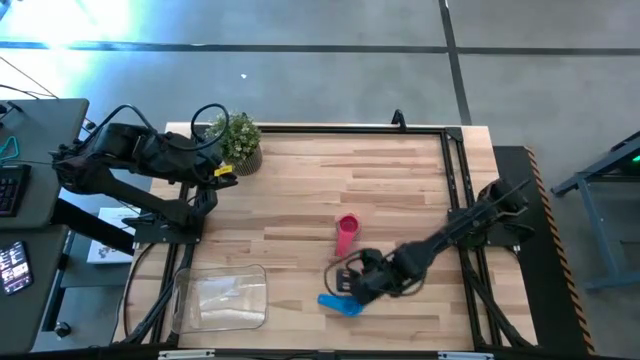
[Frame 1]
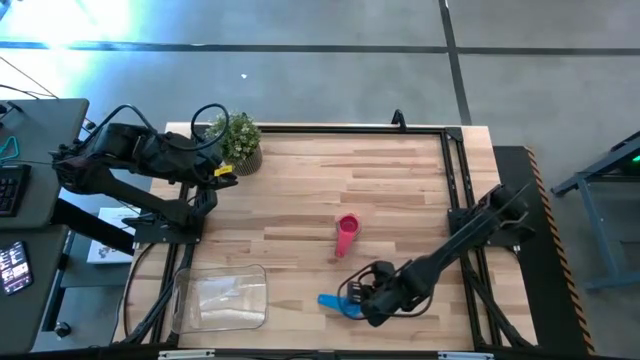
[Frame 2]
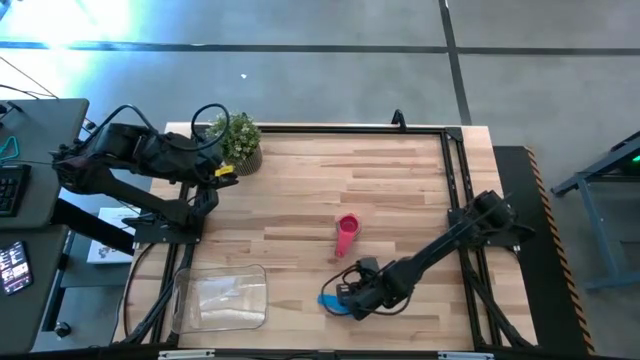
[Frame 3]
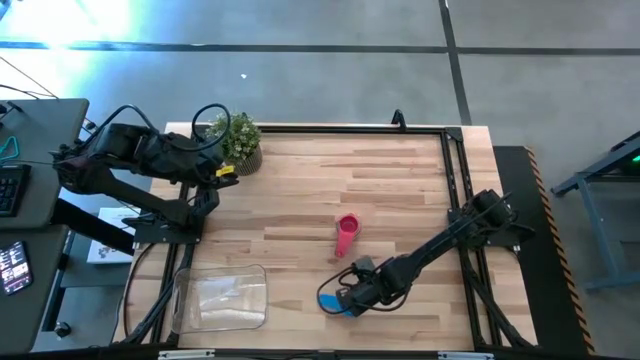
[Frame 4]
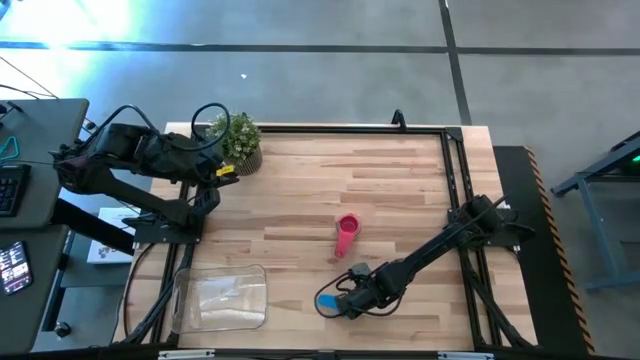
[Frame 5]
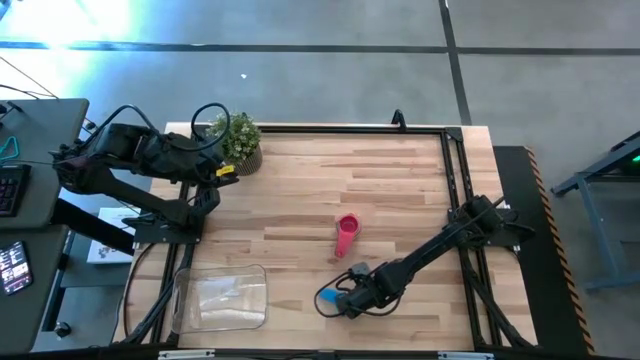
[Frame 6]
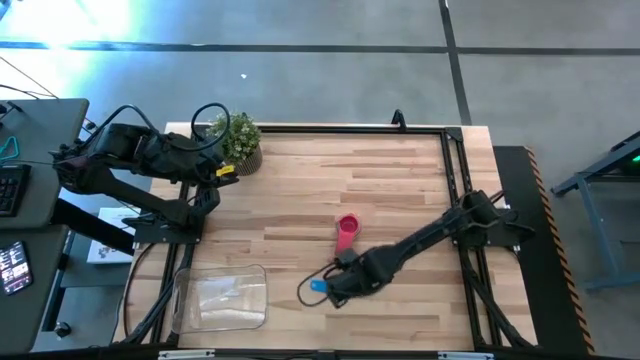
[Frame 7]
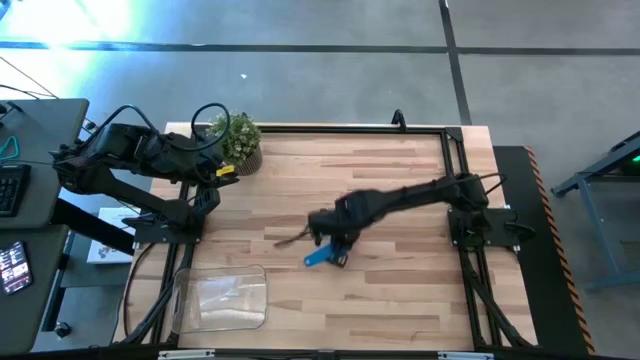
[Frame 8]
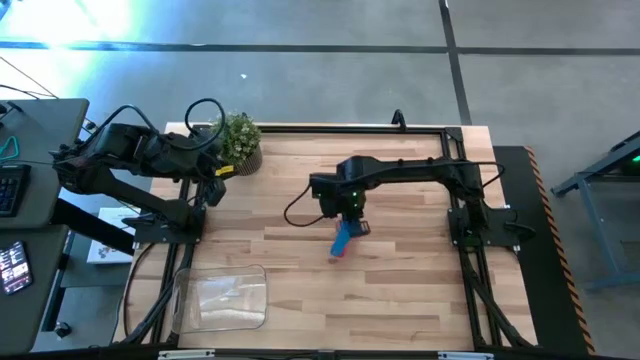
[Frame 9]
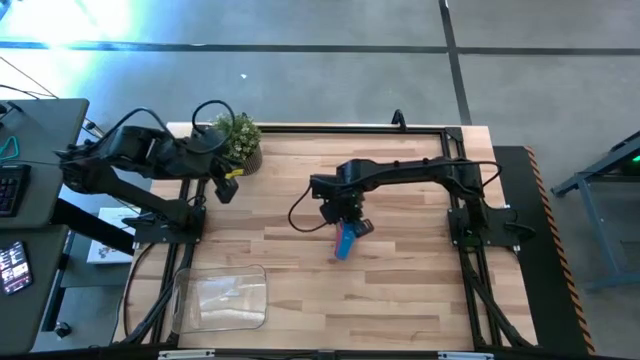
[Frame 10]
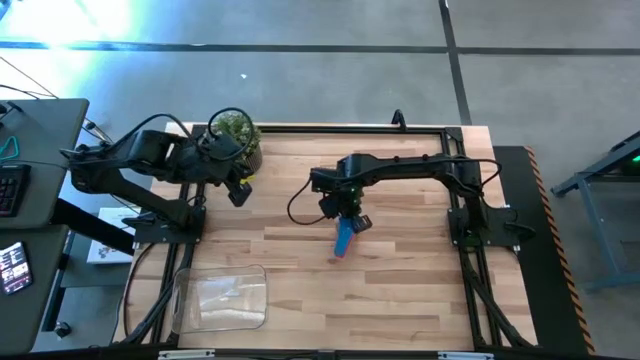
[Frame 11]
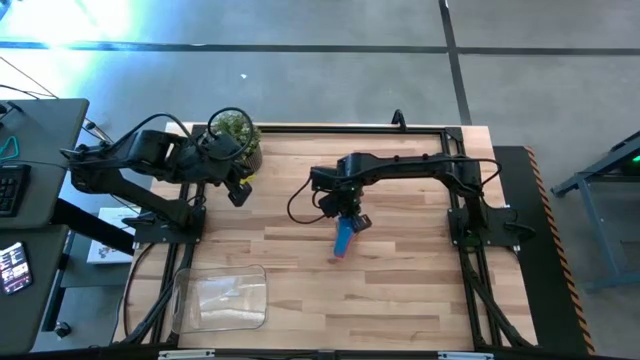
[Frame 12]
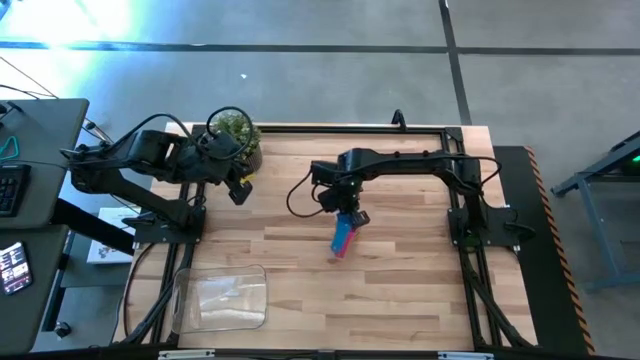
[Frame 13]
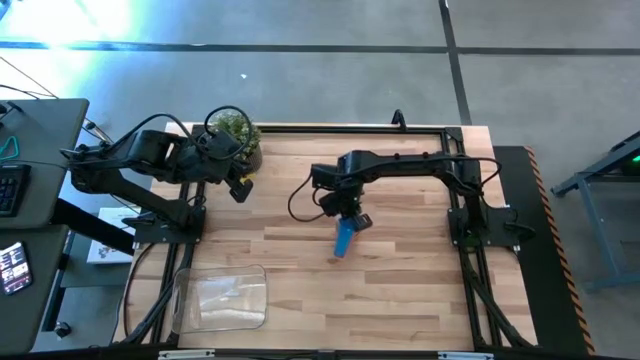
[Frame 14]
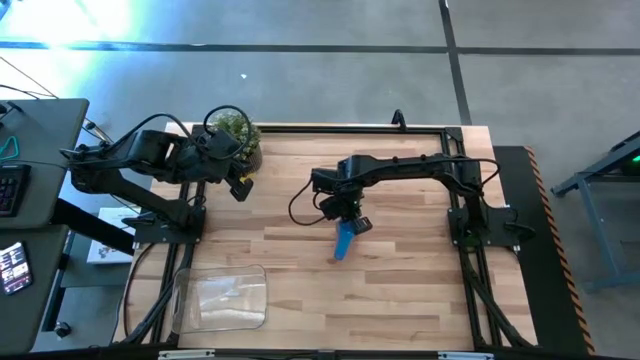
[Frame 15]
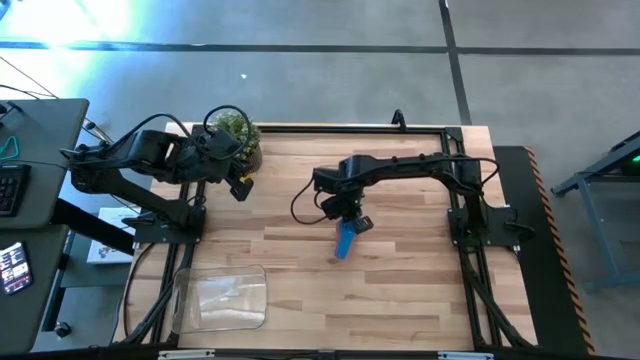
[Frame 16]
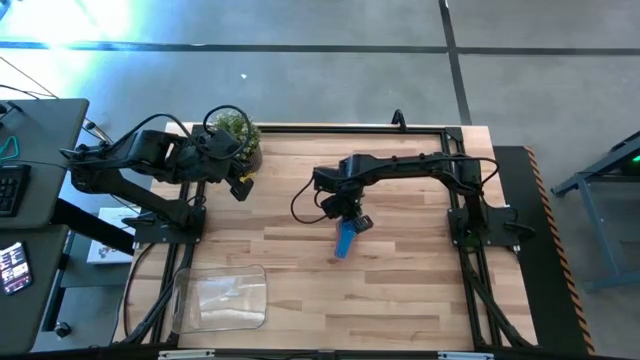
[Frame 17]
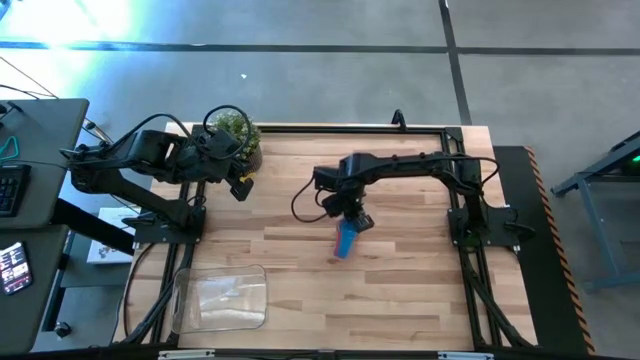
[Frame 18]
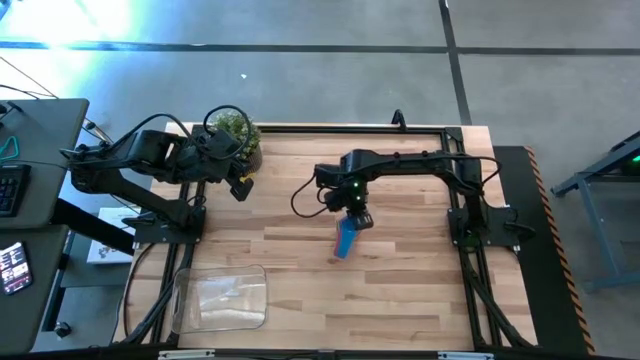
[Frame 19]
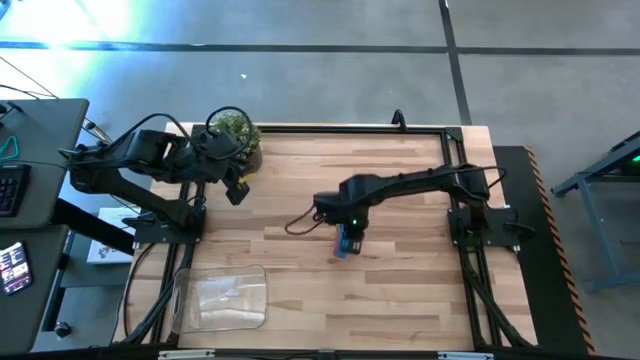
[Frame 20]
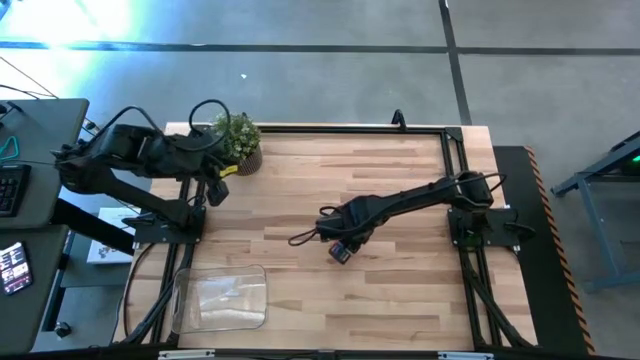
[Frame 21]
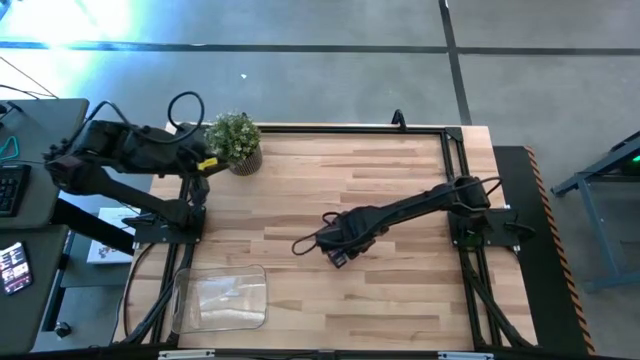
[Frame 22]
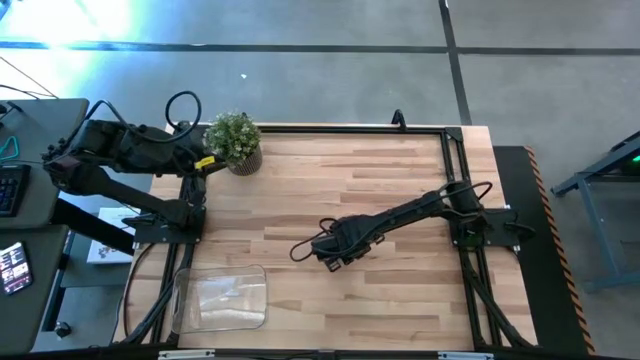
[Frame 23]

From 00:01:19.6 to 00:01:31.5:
Task: Nest measuring cups in basket
Stack the blue measuring cup on top of the red measuring cup

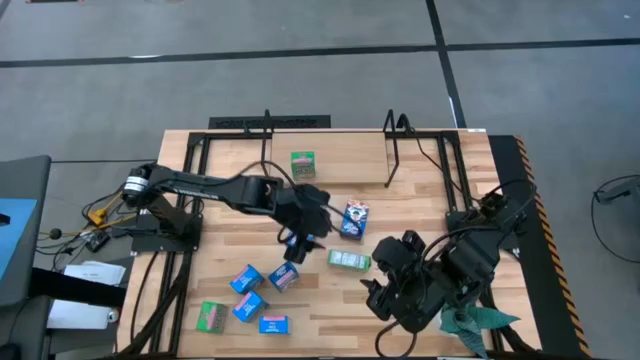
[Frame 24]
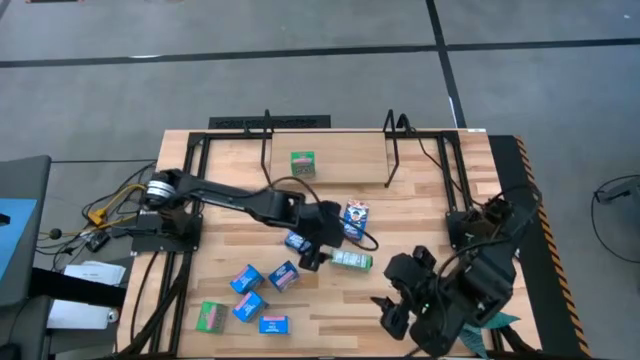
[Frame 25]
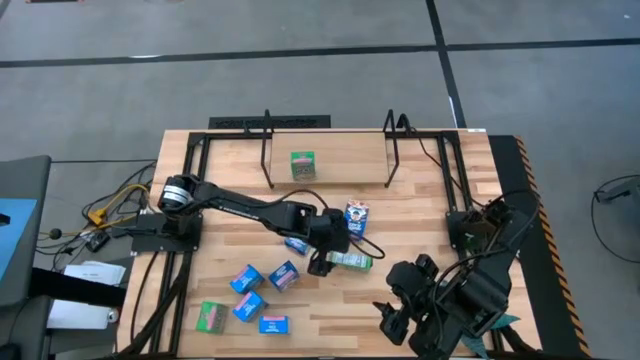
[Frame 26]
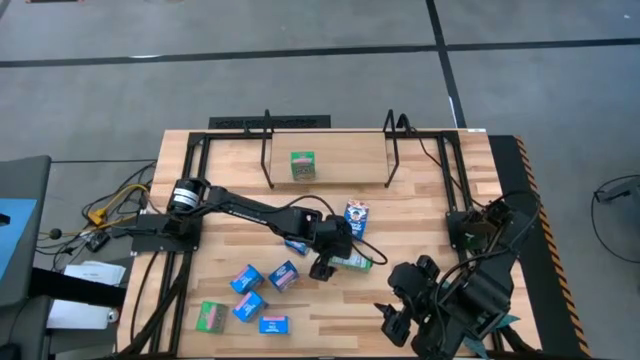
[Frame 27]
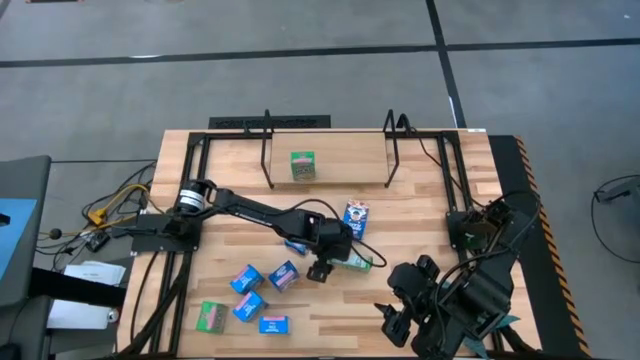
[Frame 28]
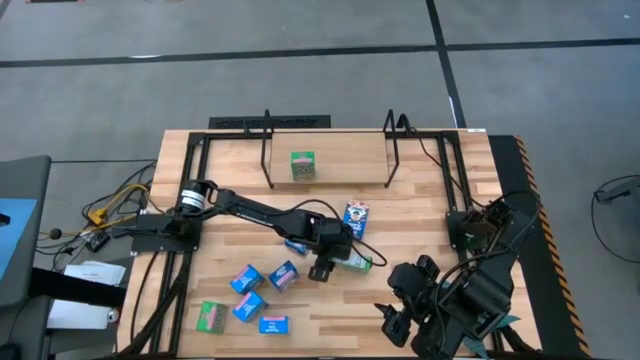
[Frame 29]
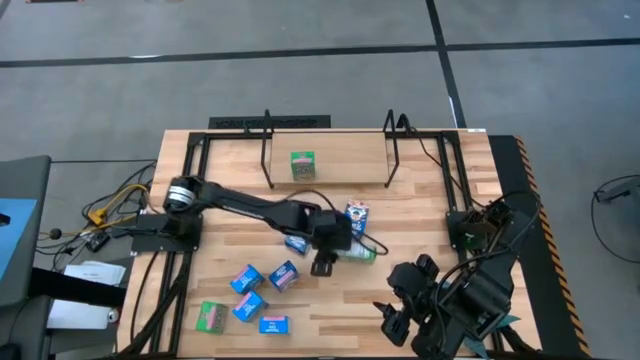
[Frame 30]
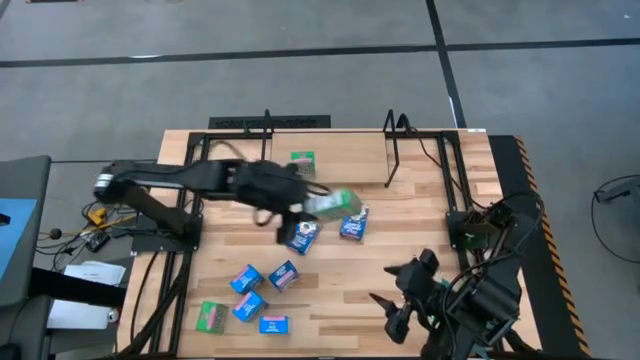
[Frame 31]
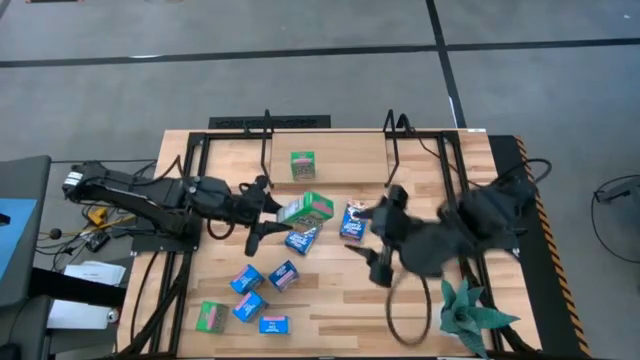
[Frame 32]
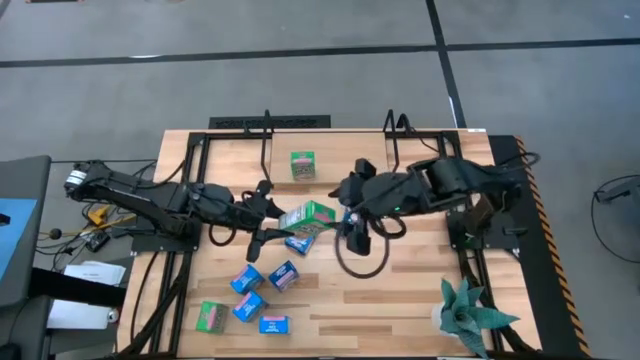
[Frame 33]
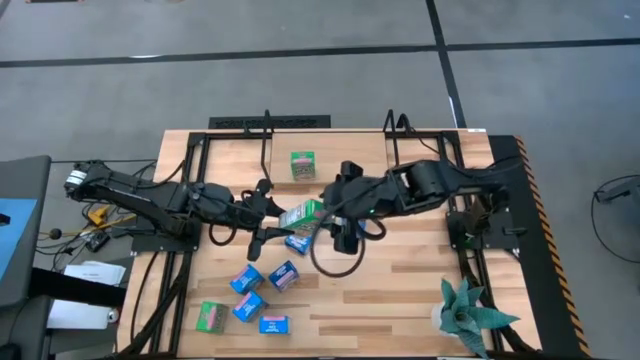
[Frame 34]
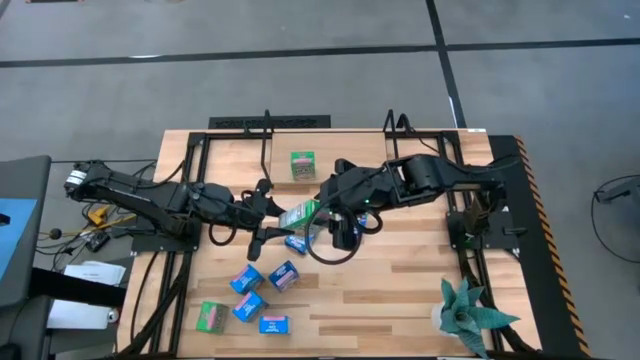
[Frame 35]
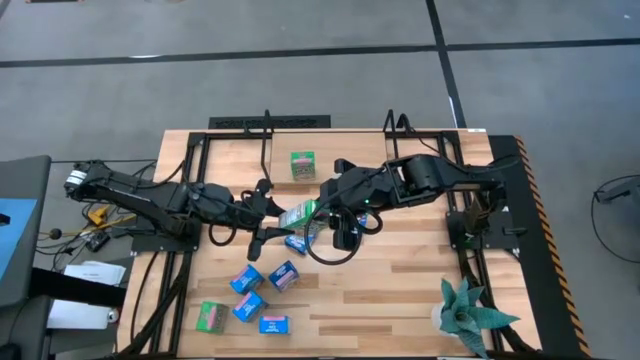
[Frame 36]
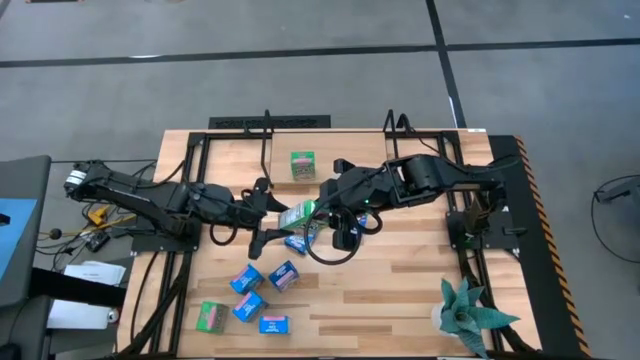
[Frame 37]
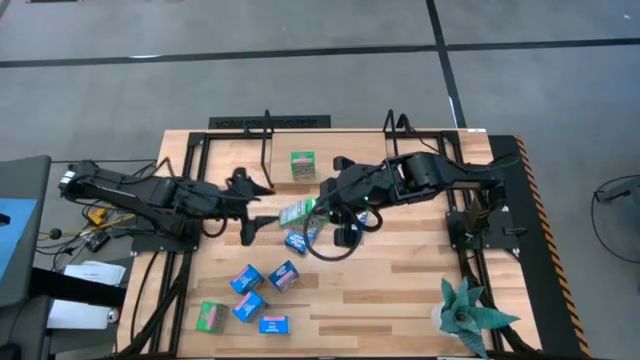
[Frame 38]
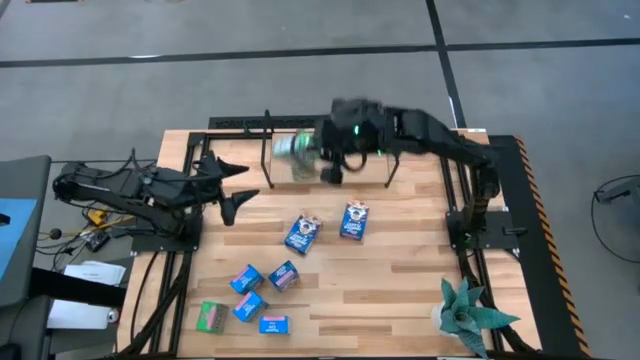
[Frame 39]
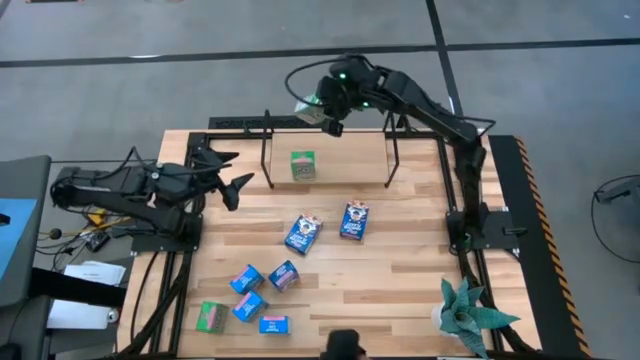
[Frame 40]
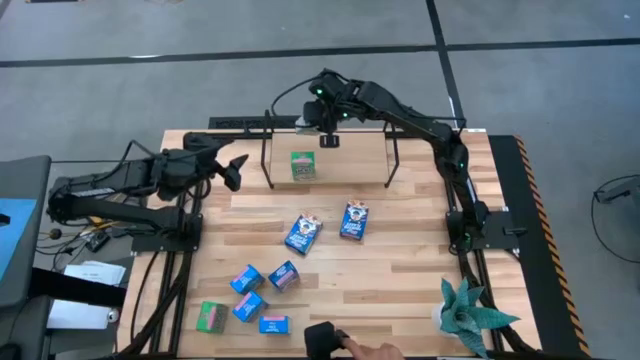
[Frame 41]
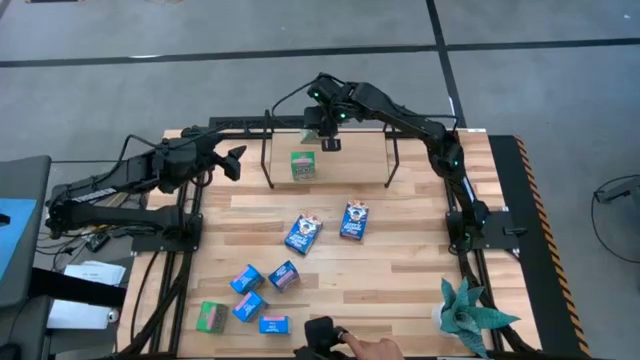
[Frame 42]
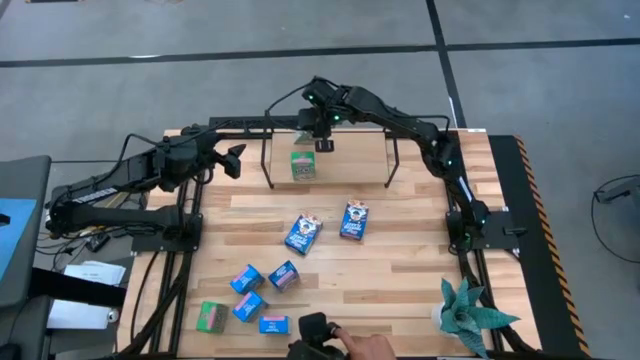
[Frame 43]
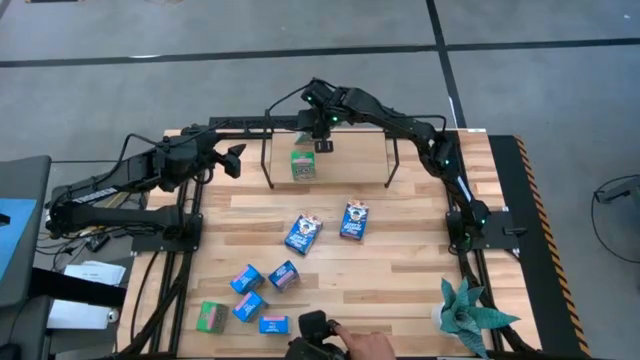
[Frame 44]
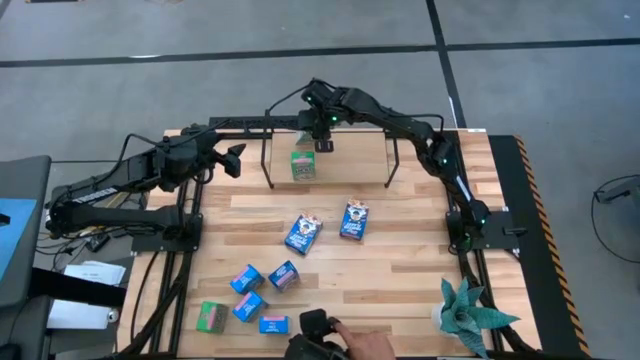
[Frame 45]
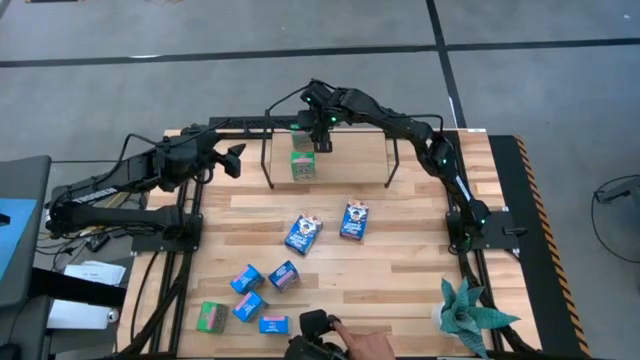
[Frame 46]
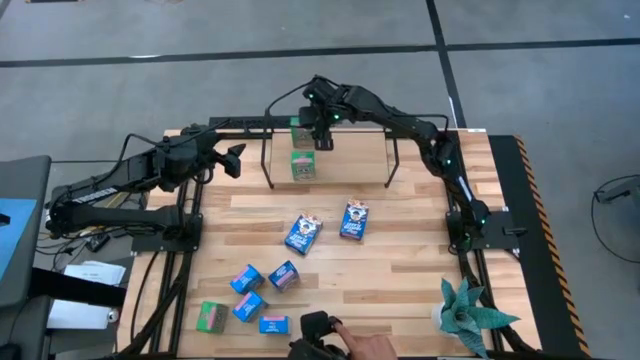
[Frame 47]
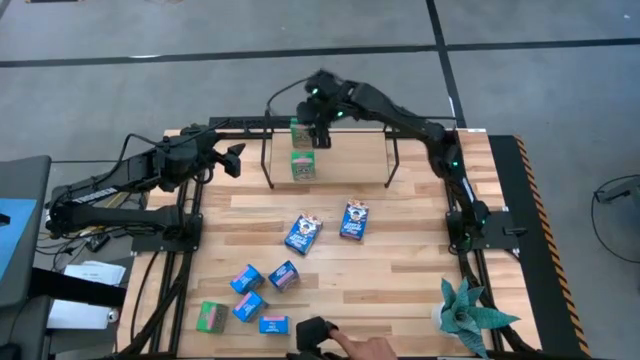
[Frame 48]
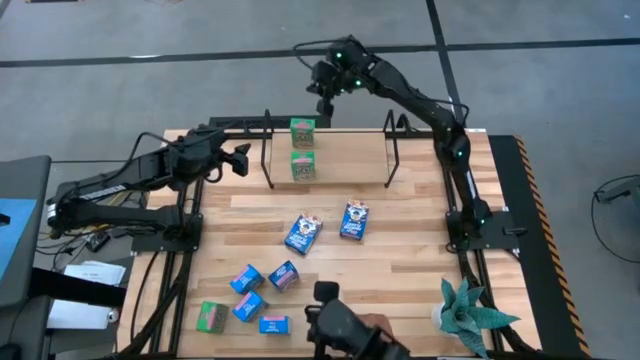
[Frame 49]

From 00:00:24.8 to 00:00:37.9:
Task: Stack cereal on shelf
Put the right green cereal box on the shelf aligned with the other green cereal box
